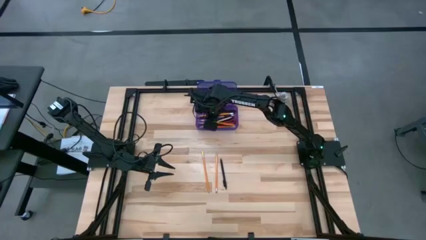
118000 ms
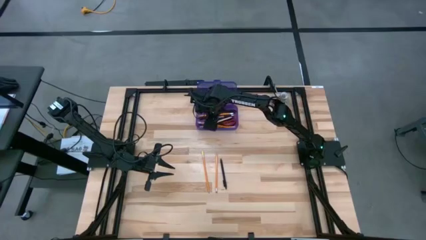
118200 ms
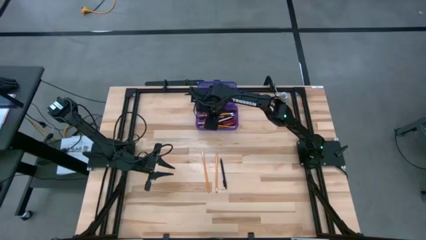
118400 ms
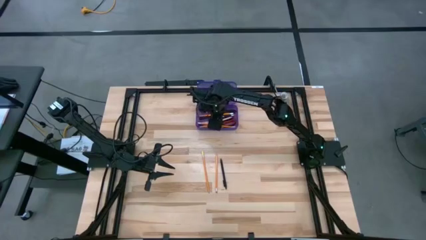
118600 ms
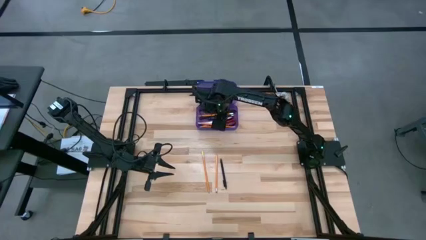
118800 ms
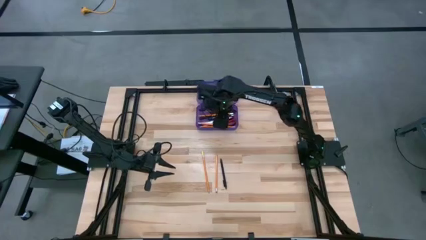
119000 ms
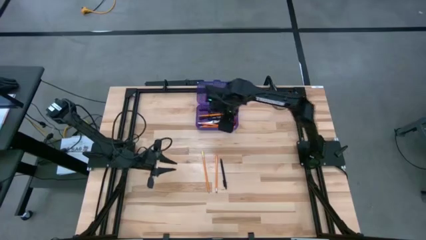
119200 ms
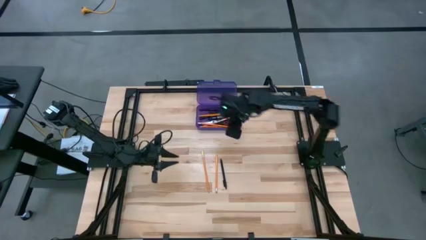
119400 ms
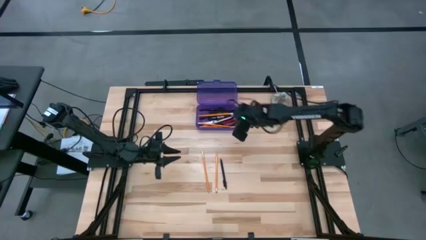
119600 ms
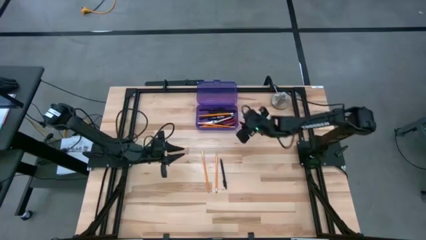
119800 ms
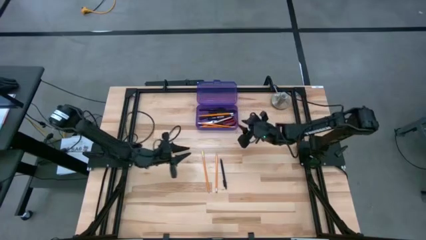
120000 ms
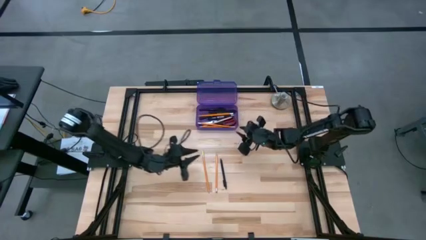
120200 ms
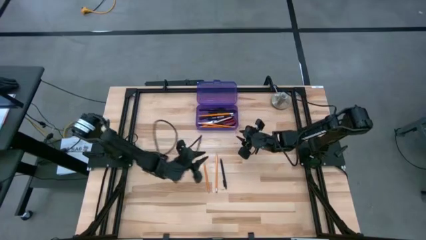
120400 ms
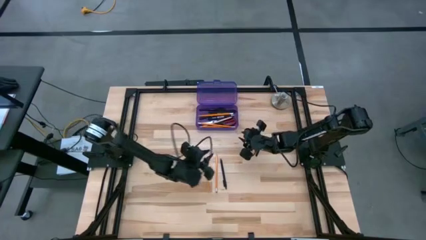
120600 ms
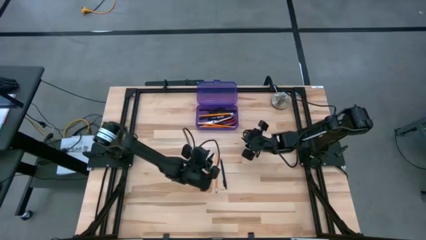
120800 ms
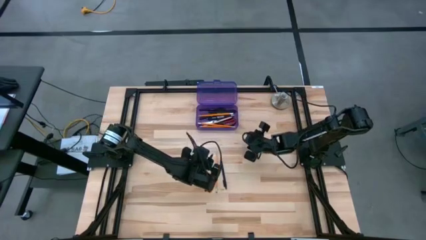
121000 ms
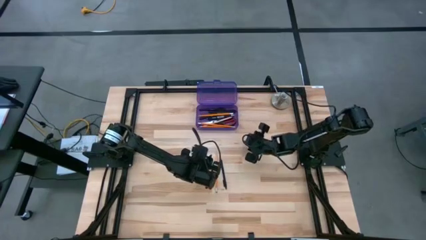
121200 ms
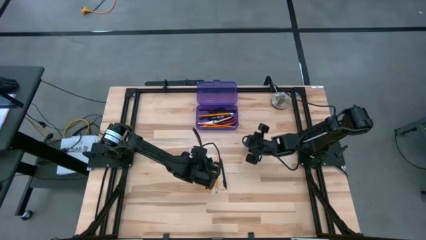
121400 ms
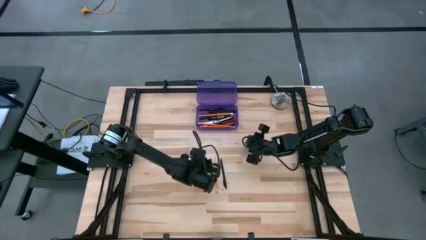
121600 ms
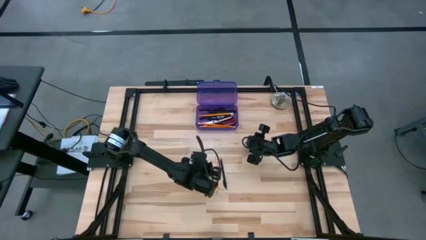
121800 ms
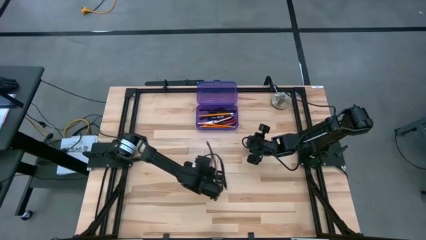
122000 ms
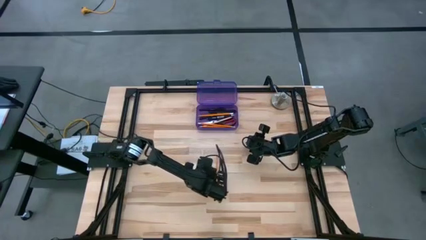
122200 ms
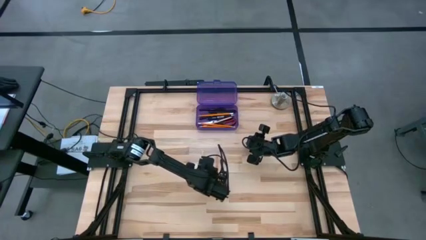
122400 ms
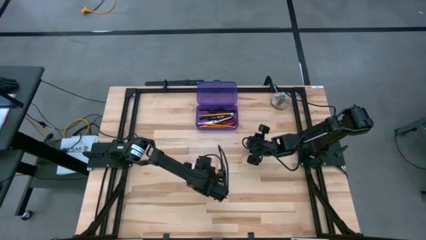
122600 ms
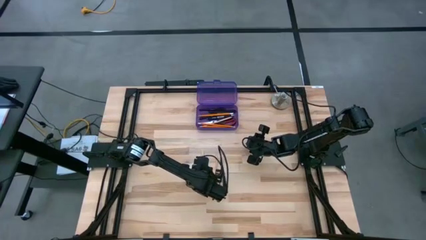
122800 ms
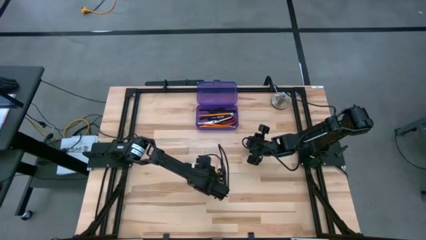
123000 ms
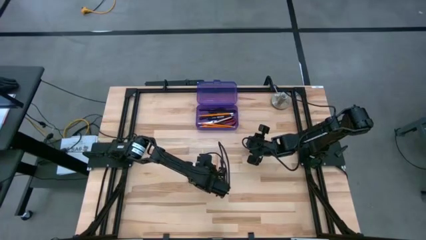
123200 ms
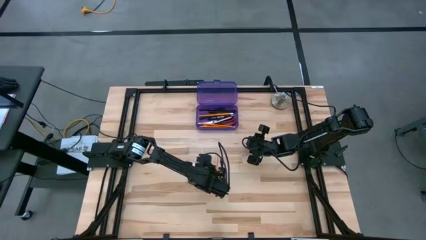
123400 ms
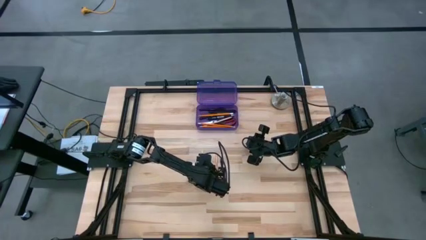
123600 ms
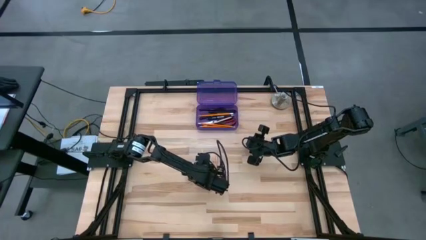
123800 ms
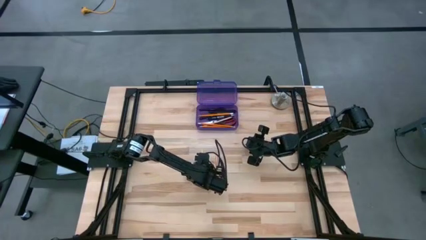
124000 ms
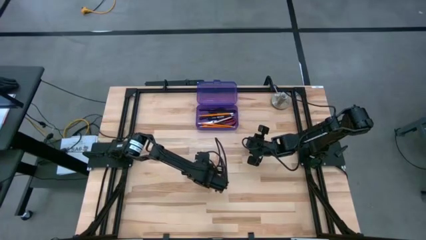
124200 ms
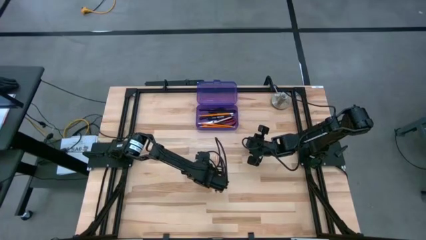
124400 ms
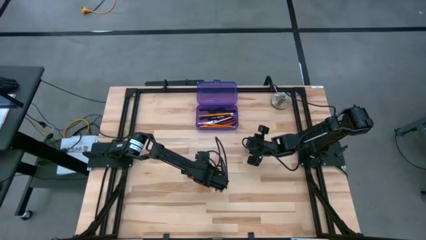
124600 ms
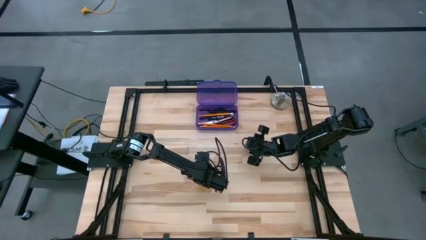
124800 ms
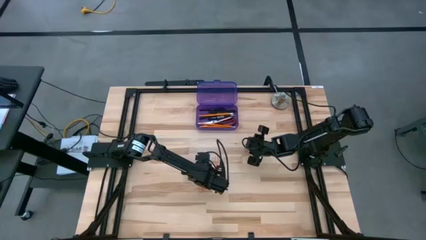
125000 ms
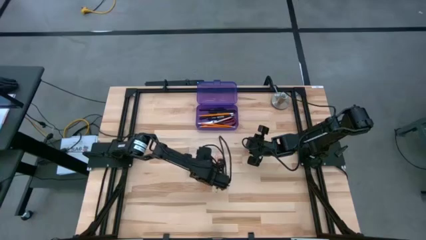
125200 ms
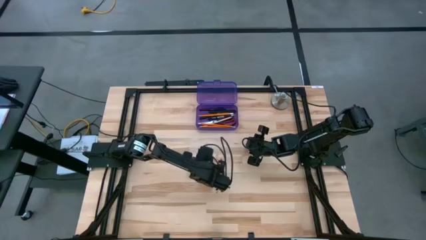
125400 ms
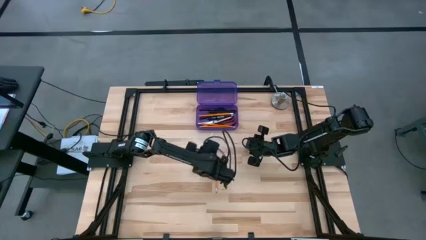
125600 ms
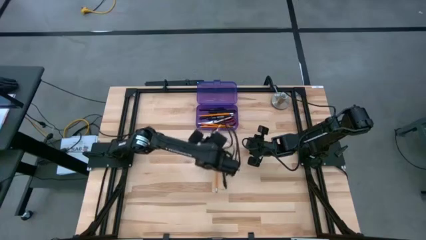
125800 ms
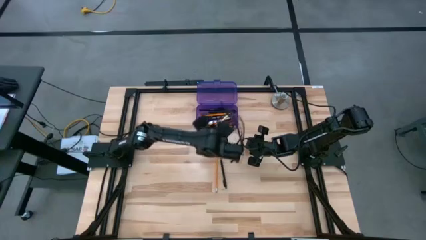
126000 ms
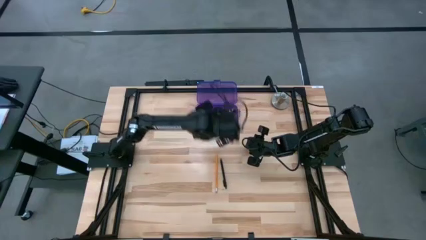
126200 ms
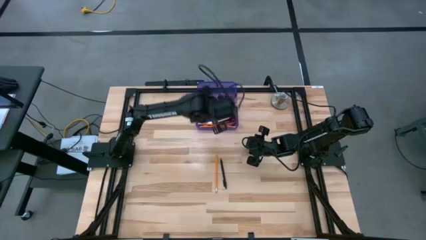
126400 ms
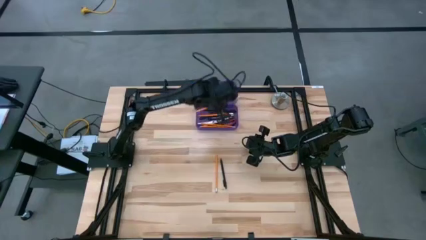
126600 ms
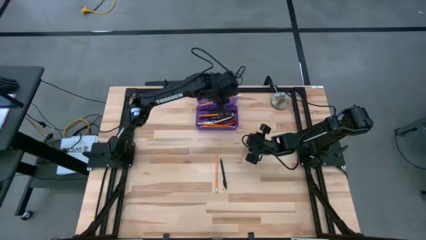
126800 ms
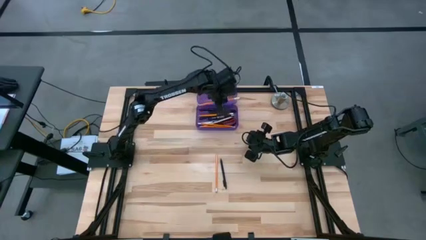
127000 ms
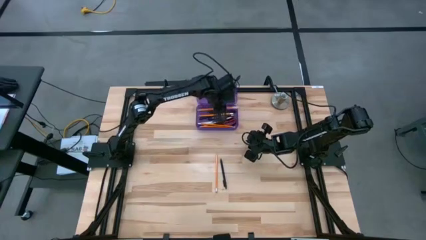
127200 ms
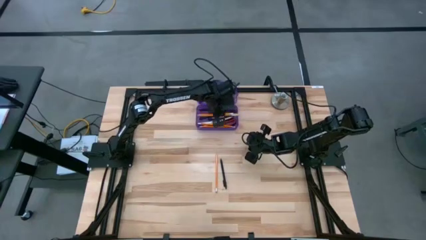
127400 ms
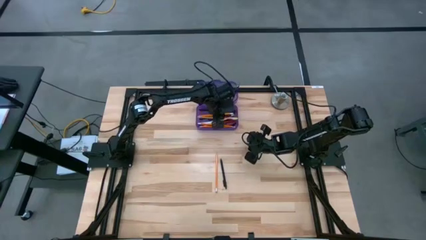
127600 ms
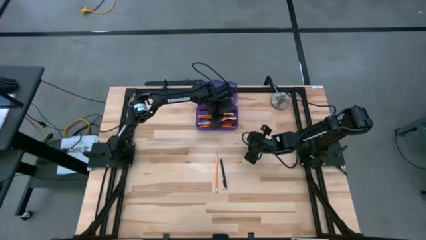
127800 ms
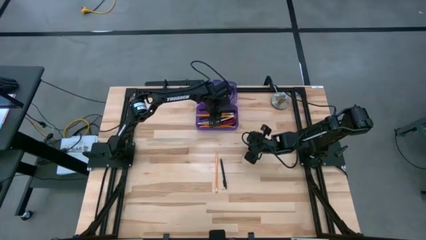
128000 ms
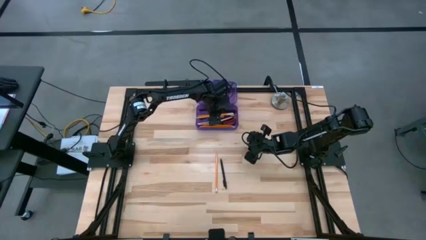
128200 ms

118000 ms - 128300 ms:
Task: Pick & place school supplies into a supply box
Put the orange pencil into the violet supply box

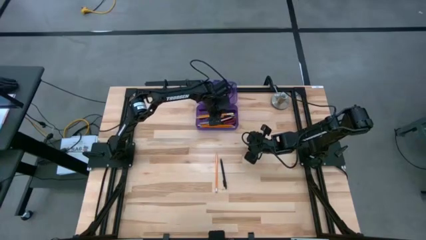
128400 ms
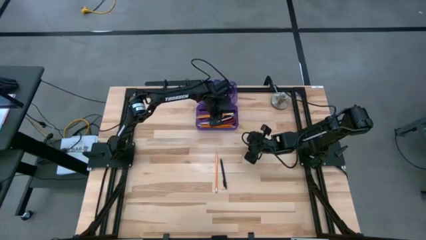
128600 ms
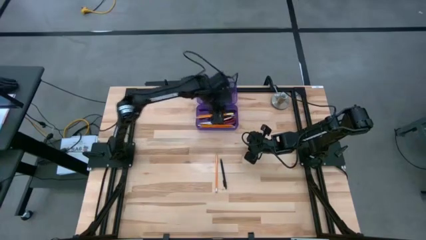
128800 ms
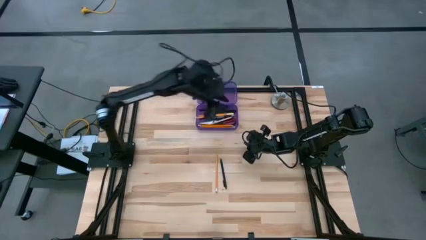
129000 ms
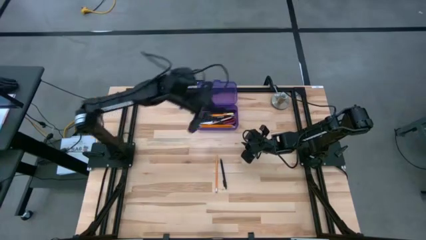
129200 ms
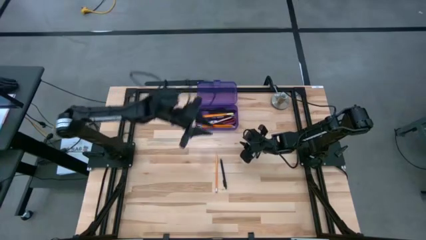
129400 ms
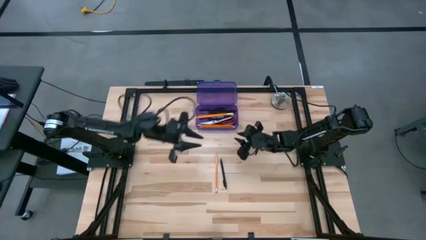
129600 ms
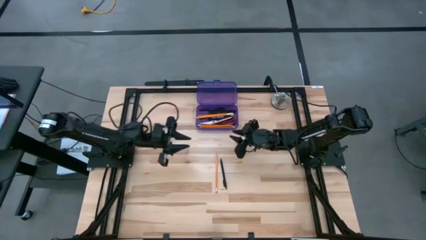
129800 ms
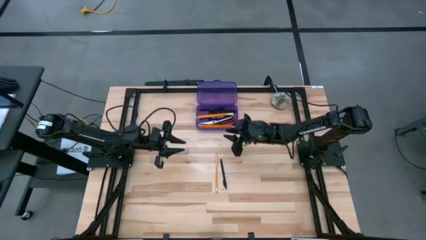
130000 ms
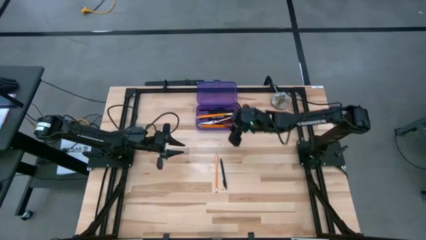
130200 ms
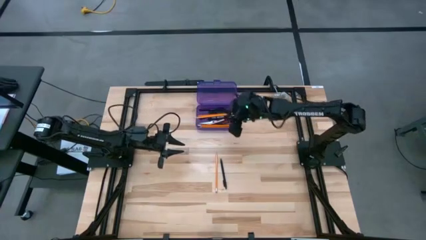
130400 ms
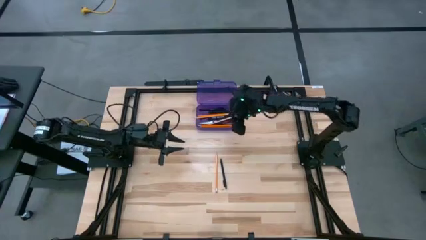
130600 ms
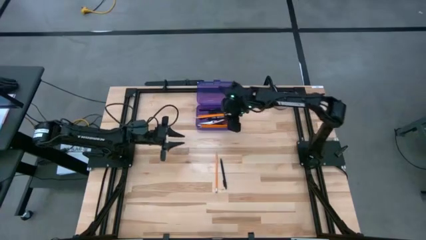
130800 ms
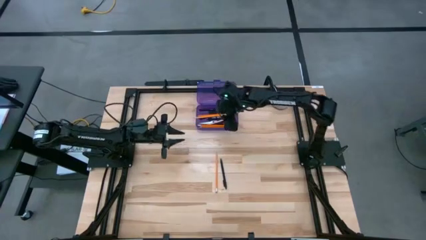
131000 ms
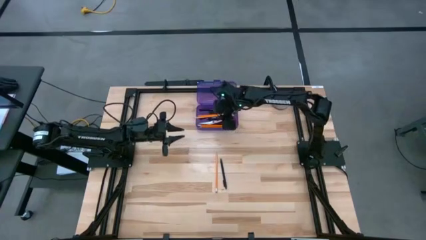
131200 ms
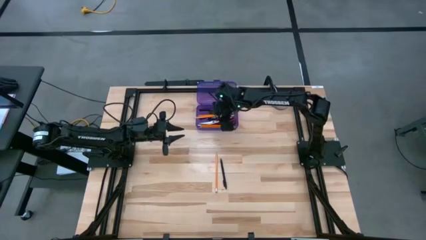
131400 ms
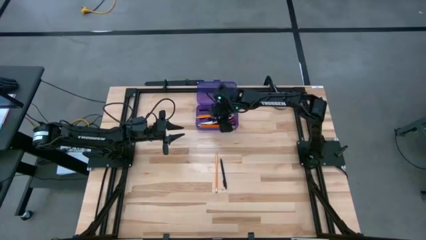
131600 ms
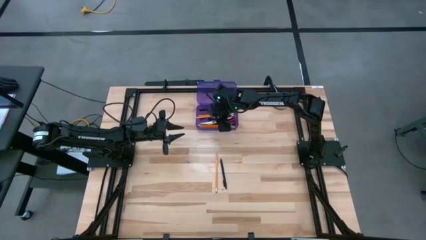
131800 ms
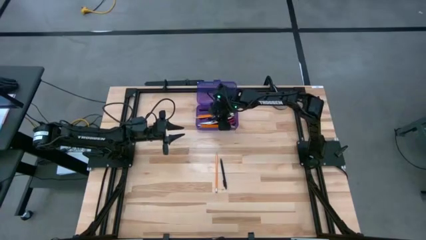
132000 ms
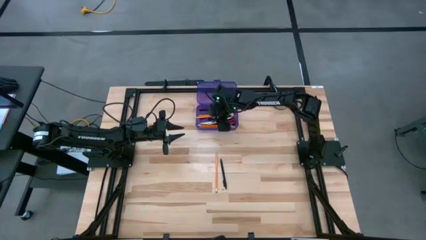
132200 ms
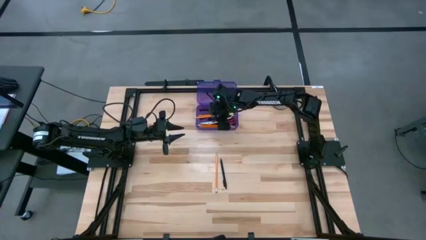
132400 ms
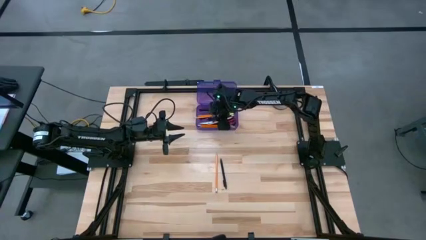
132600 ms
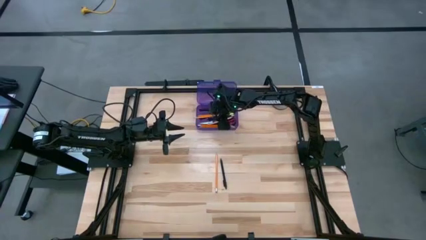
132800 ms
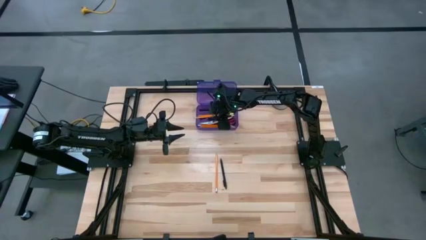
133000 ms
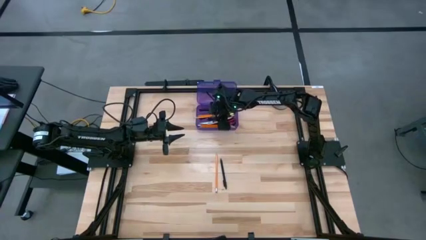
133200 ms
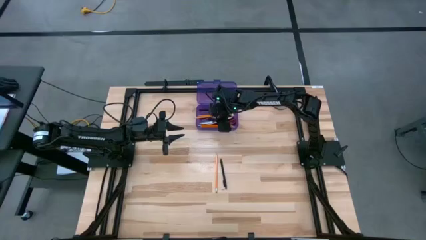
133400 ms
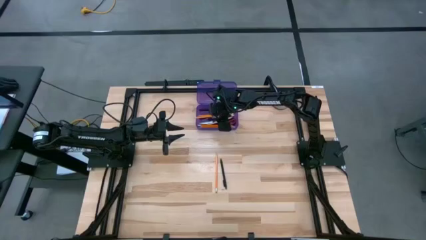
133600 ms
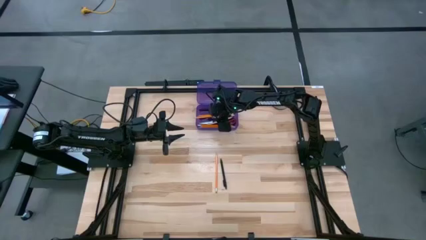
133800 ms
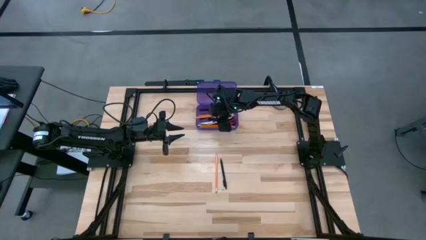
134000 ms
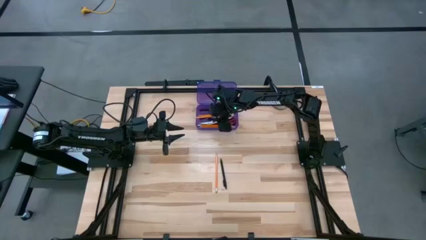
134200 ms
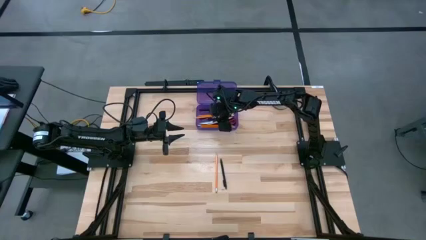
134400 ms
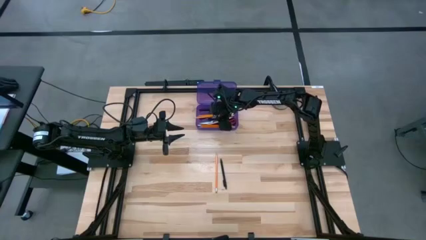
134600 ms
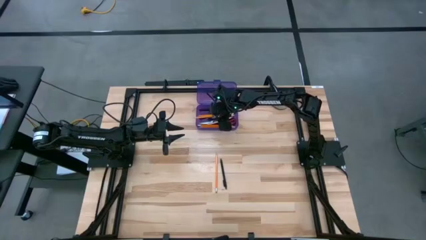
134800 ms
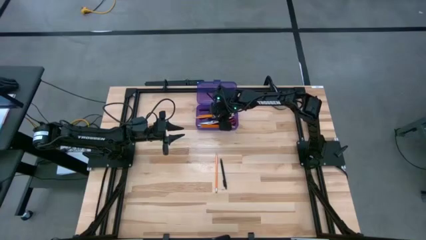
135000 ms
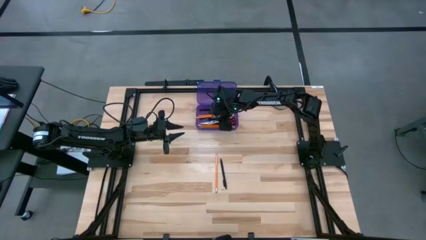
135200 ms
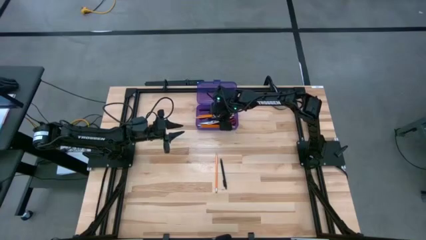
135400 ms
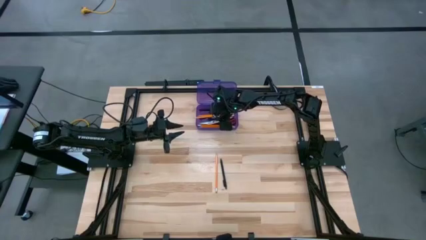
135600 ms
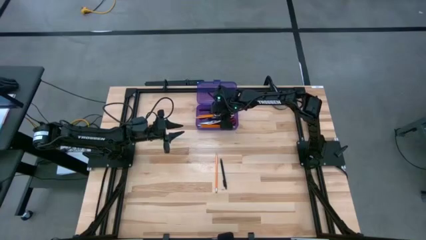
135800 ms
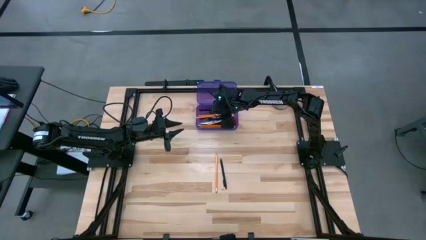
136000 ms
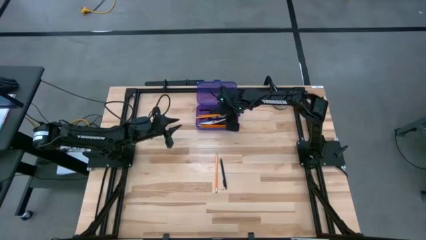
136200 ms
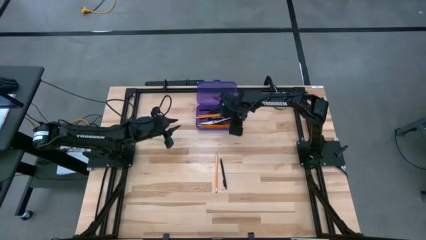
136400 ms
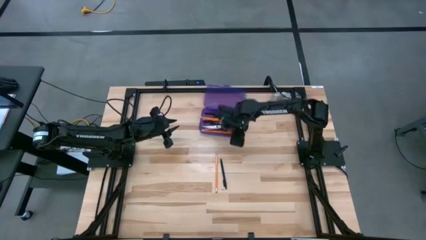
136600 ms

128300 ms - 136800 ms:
Adjust the violet supply box
